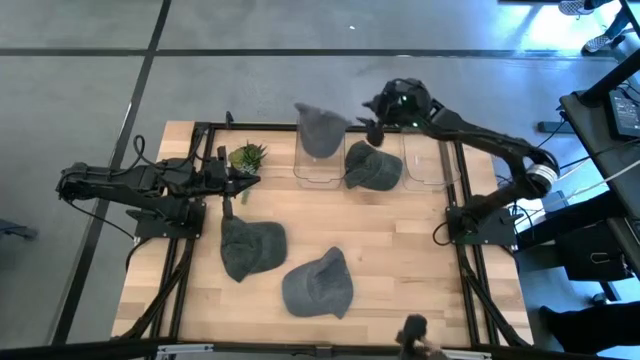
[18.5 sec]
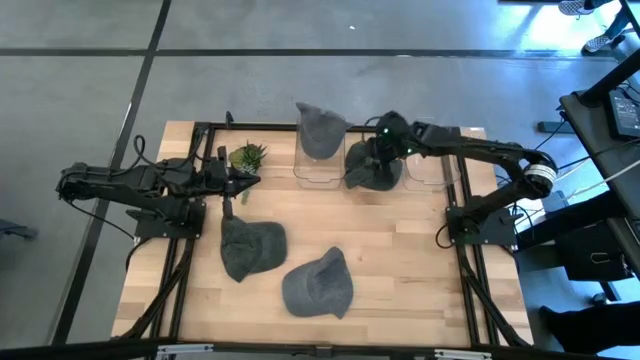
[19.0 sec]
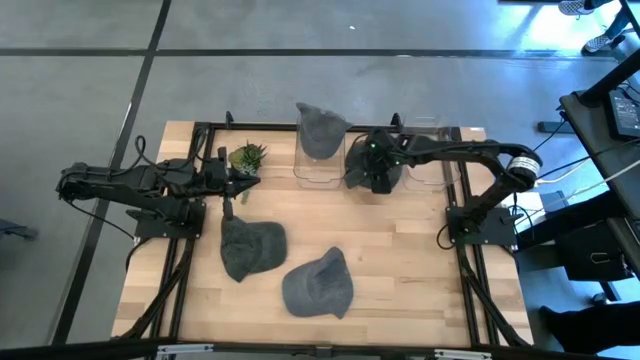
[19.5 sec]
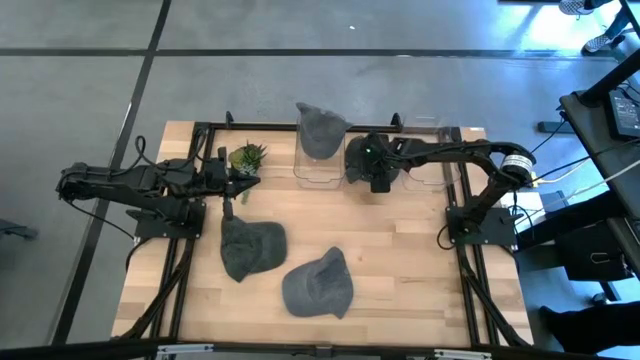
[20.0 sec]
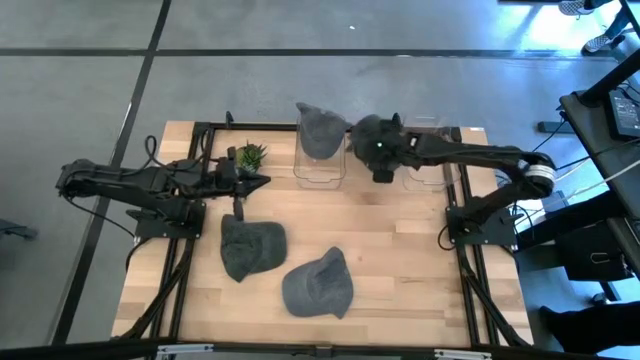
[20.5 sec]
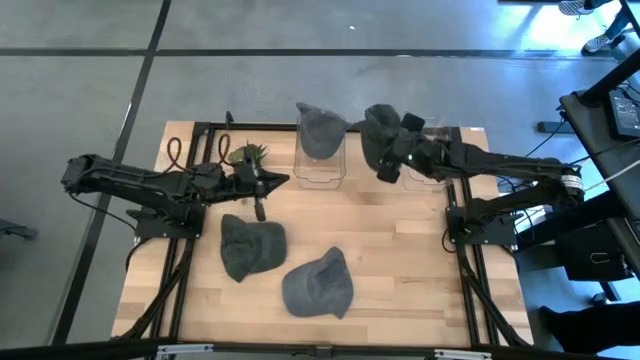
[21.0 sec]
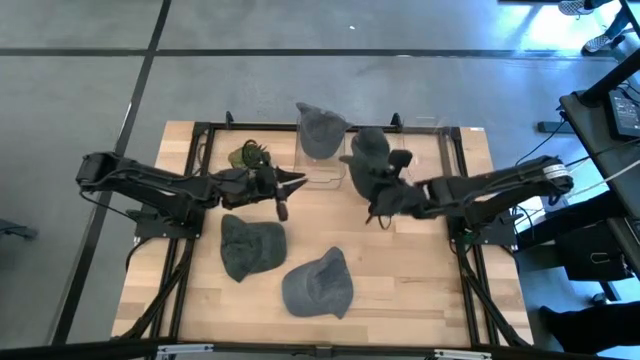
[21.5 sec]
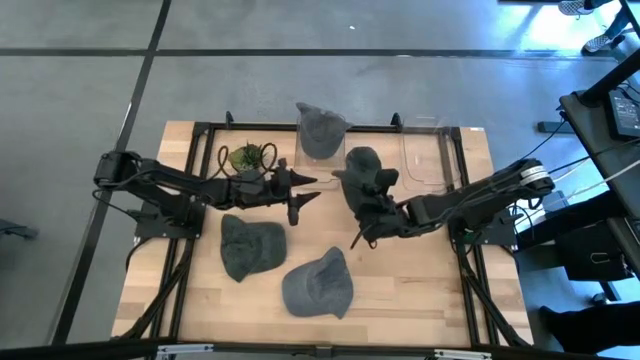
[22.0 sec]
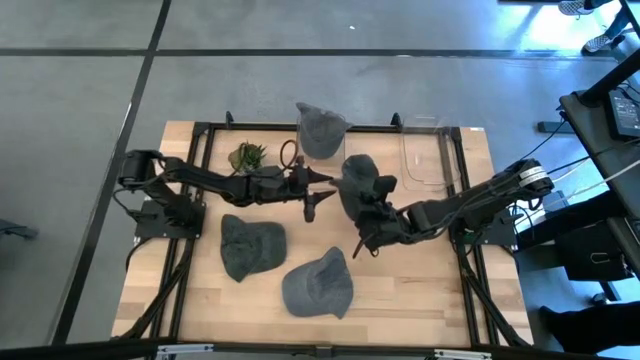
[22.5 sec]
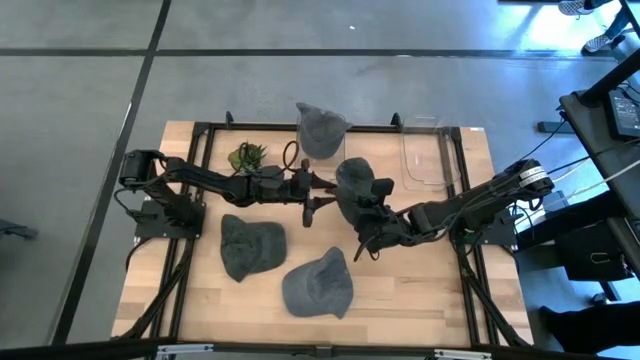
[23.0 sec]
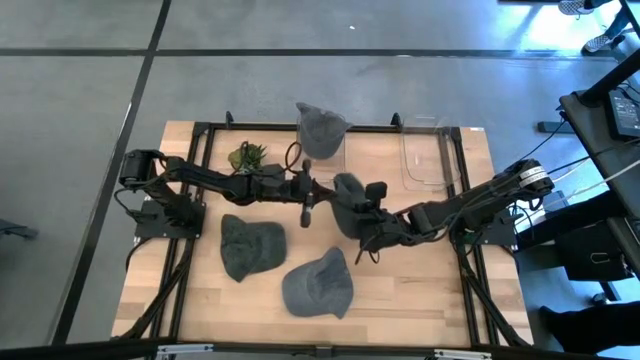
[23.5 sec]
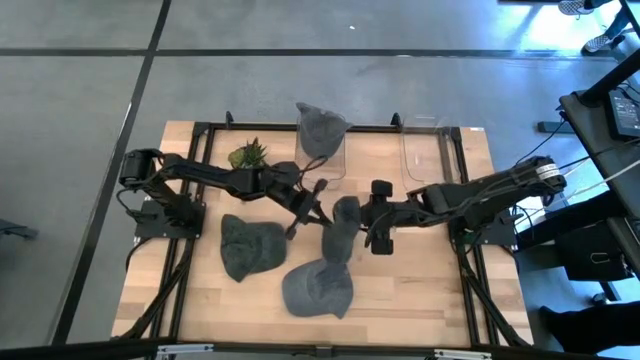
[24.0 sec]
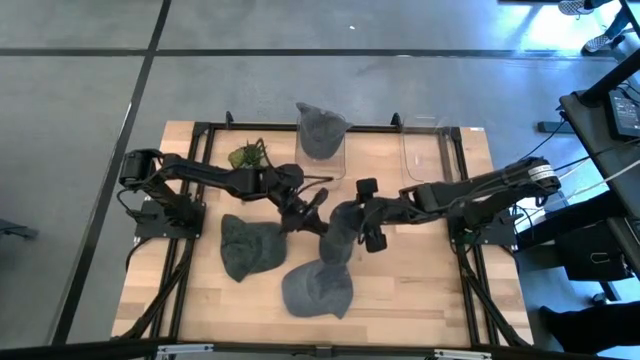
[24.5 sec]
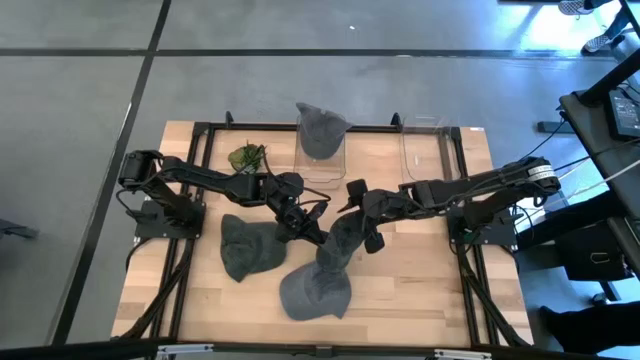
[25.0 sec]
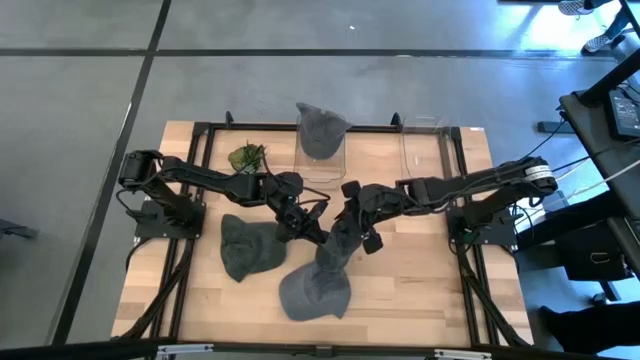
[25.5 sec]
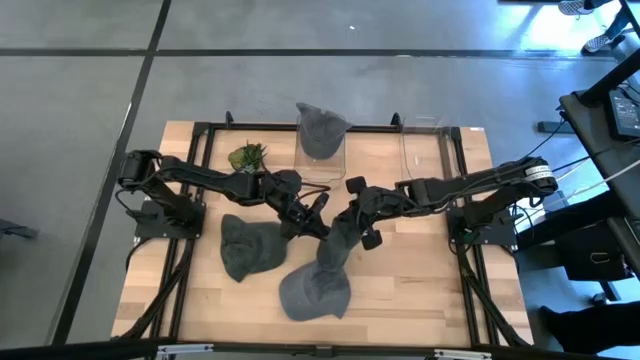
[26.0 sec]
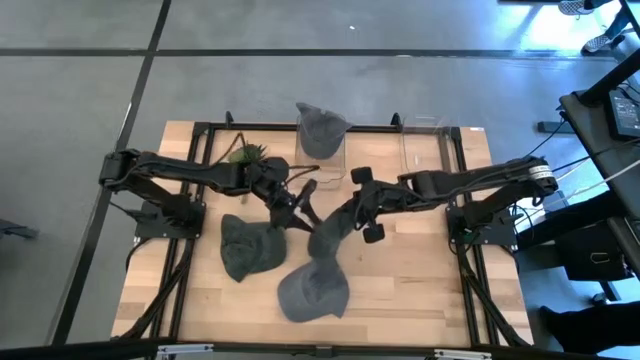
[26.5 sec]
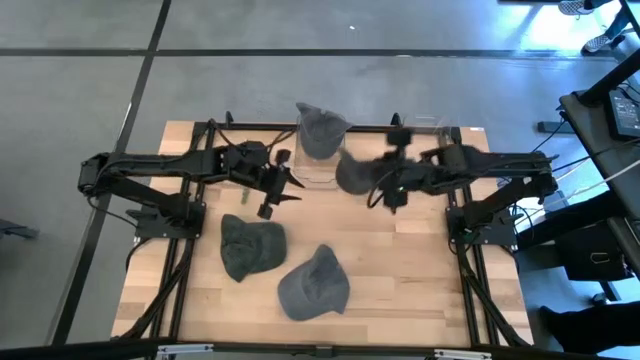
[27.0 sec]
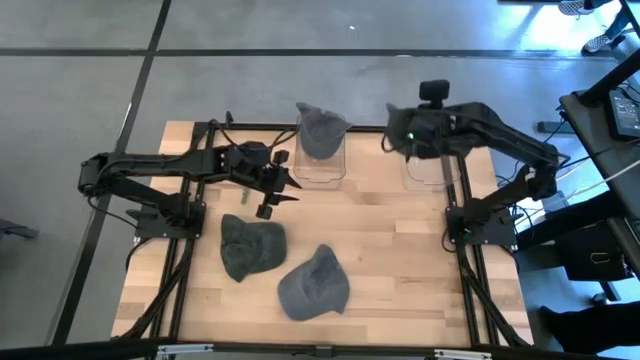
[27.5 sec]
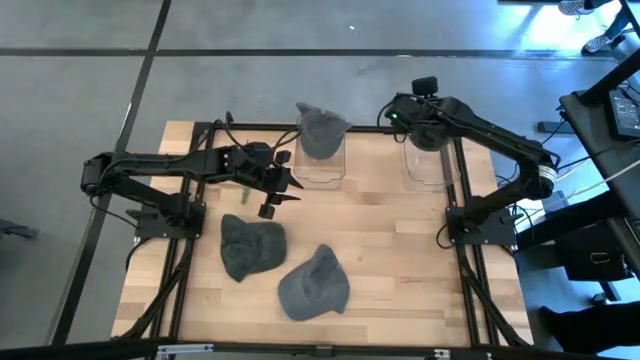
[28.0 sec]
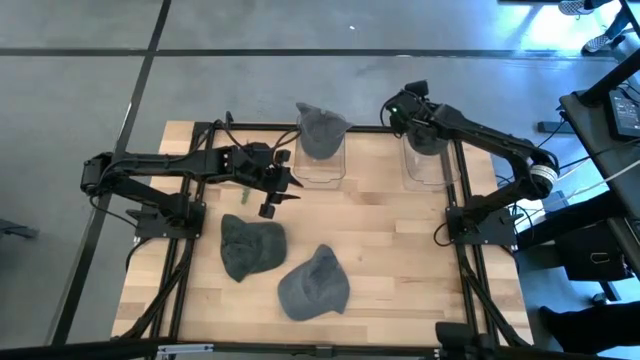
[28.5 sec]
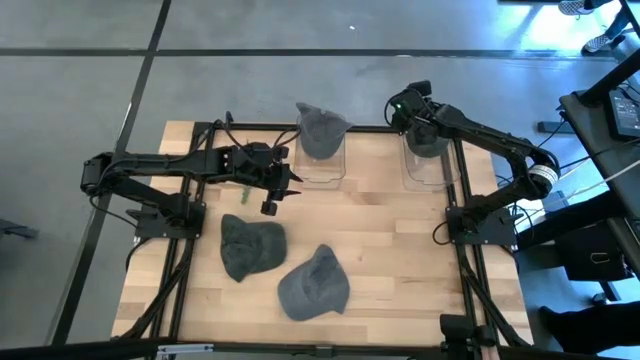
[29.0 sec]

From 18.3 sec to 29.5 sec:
Task: Pick & Place hat
Put the top green cap into the right transparent bin

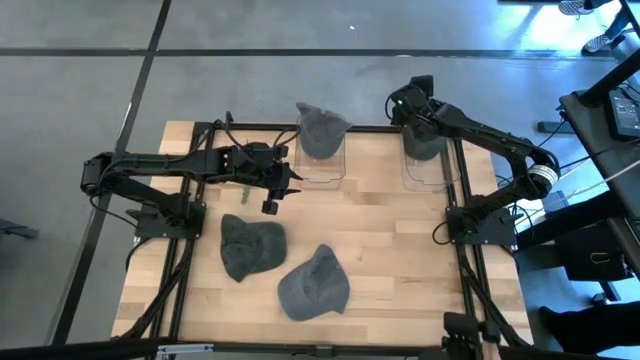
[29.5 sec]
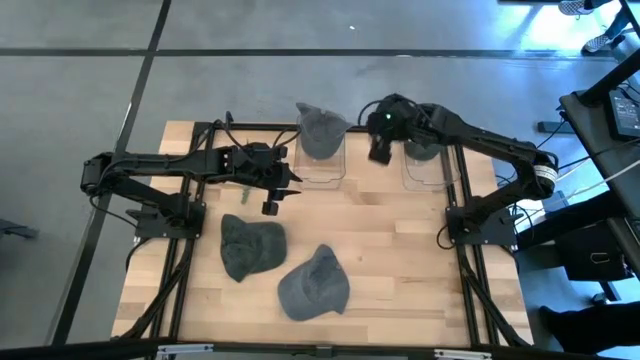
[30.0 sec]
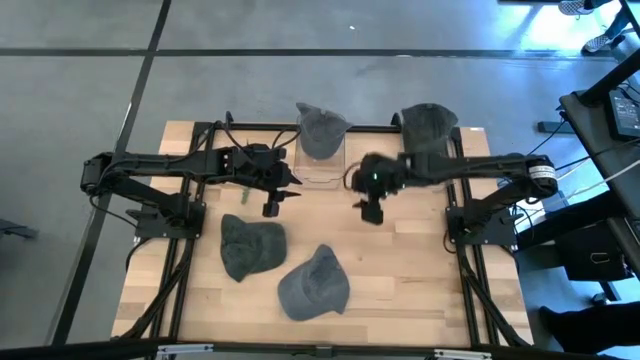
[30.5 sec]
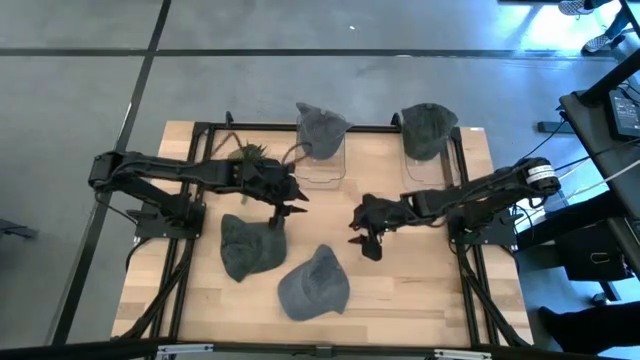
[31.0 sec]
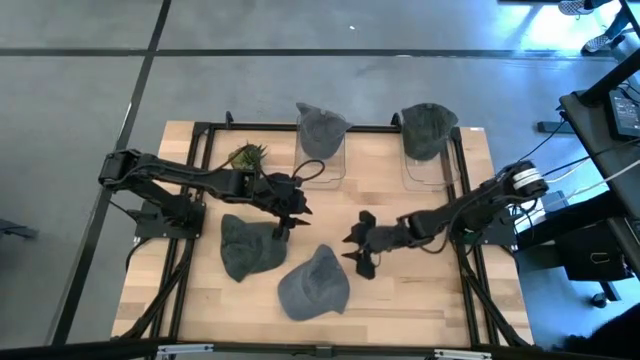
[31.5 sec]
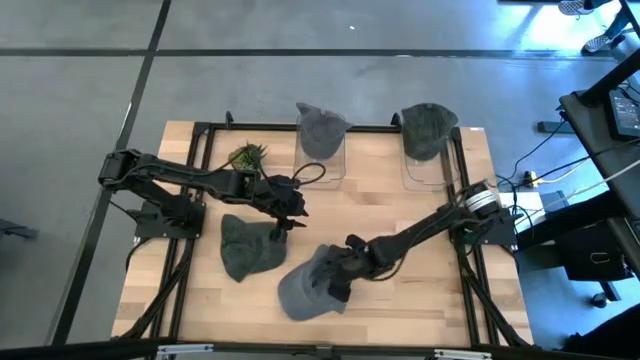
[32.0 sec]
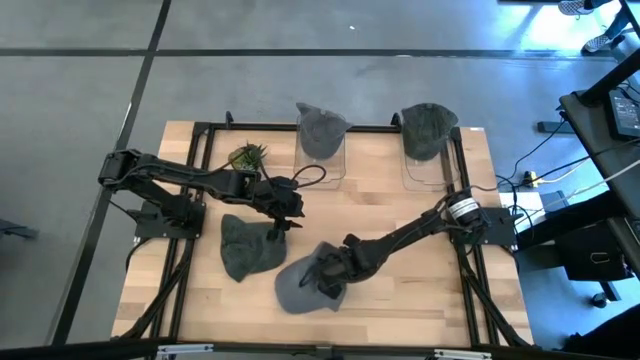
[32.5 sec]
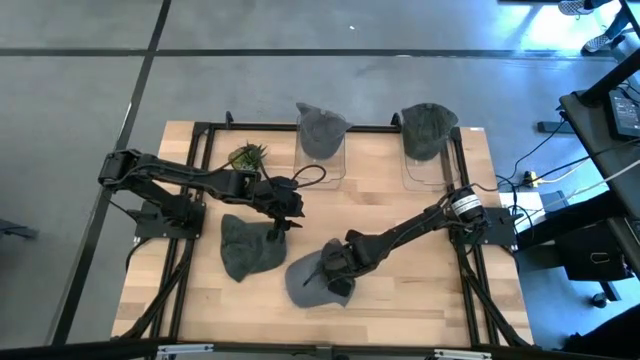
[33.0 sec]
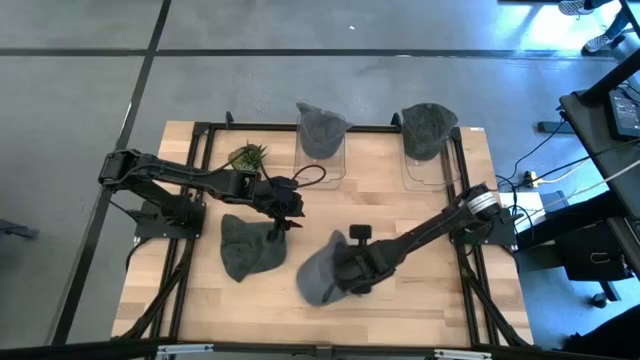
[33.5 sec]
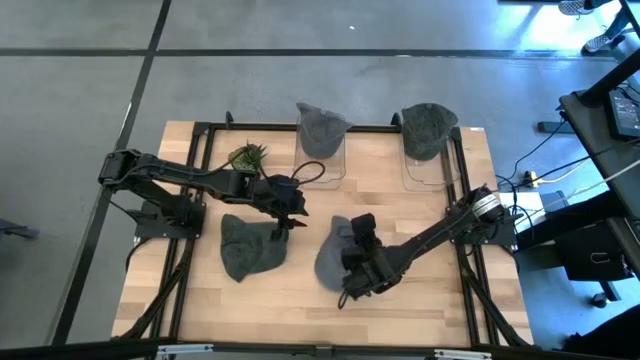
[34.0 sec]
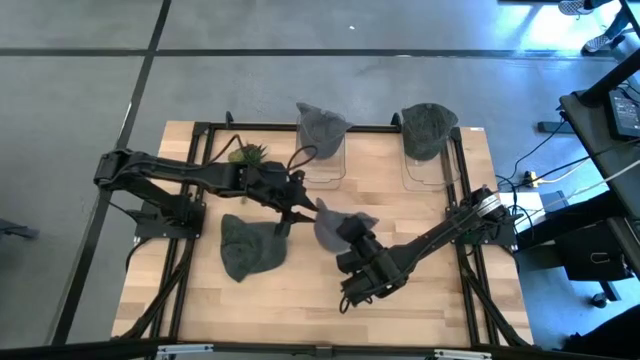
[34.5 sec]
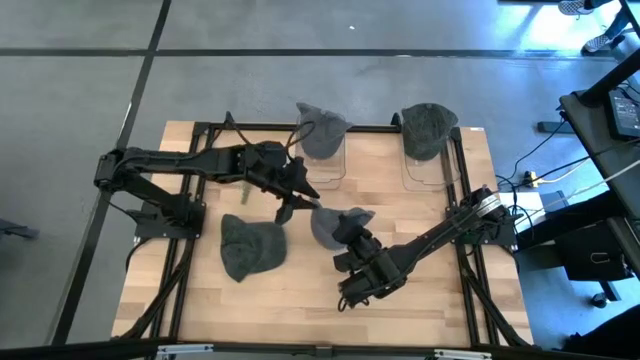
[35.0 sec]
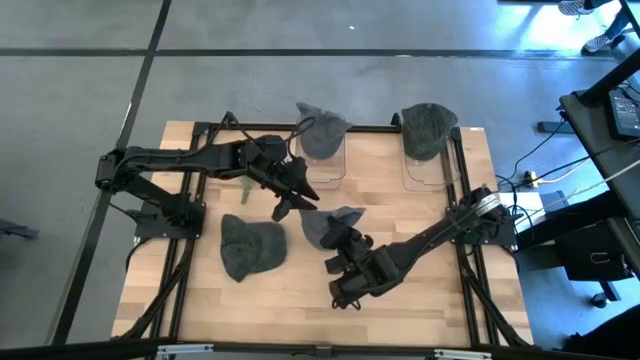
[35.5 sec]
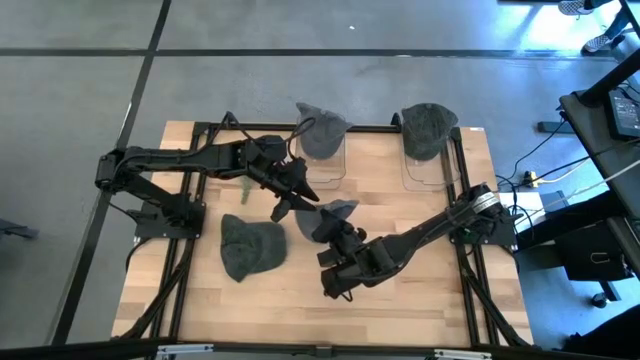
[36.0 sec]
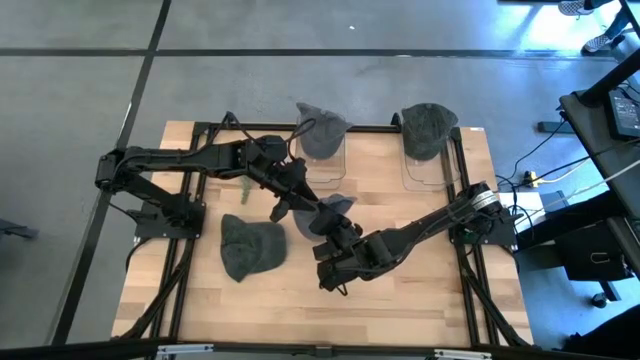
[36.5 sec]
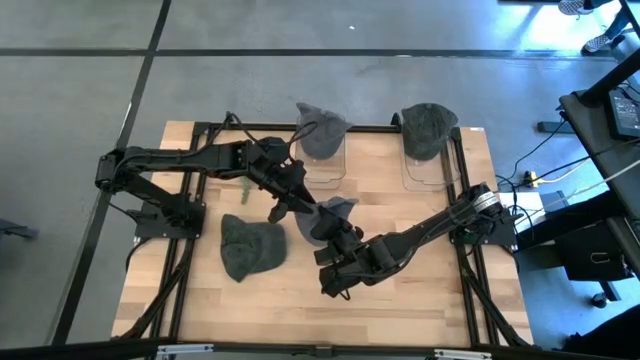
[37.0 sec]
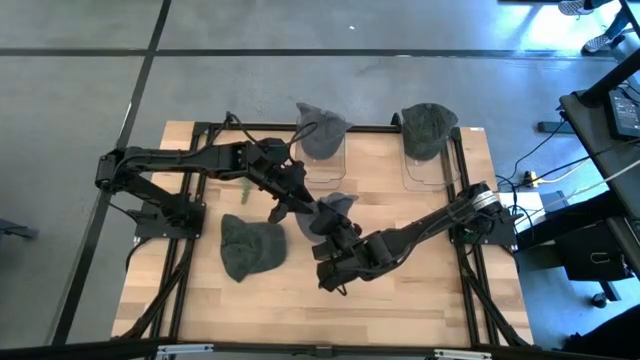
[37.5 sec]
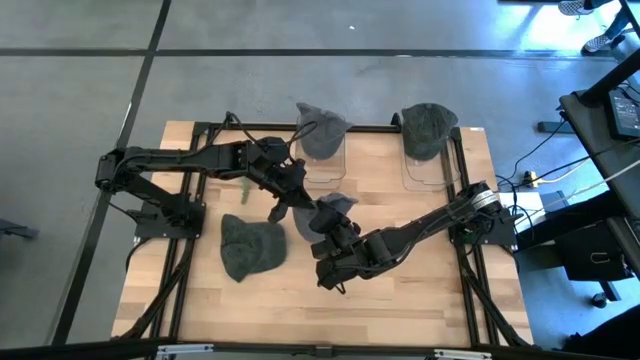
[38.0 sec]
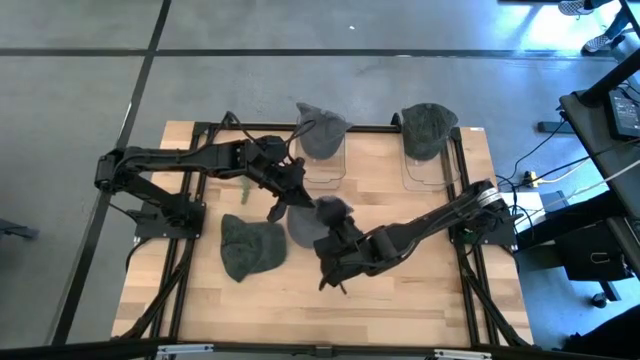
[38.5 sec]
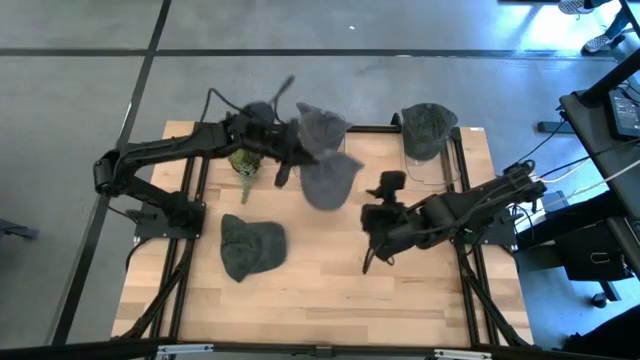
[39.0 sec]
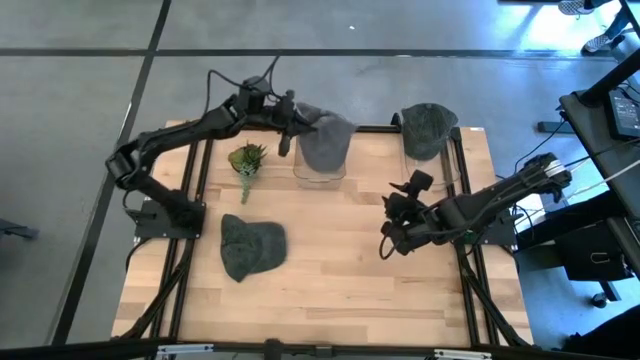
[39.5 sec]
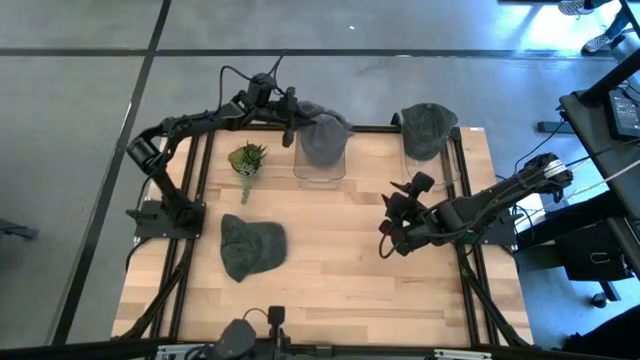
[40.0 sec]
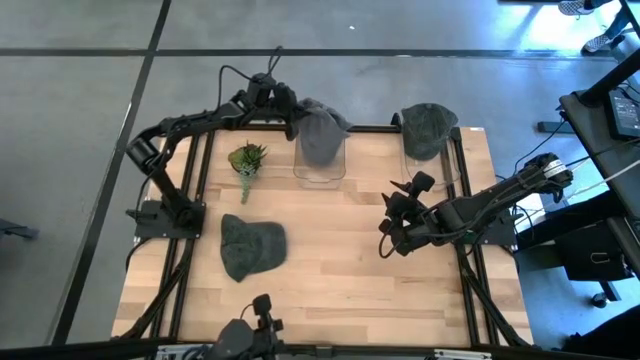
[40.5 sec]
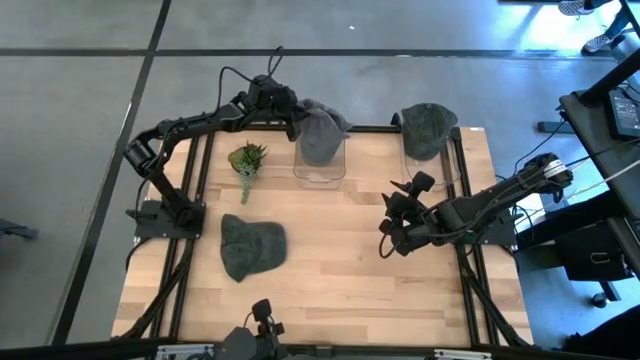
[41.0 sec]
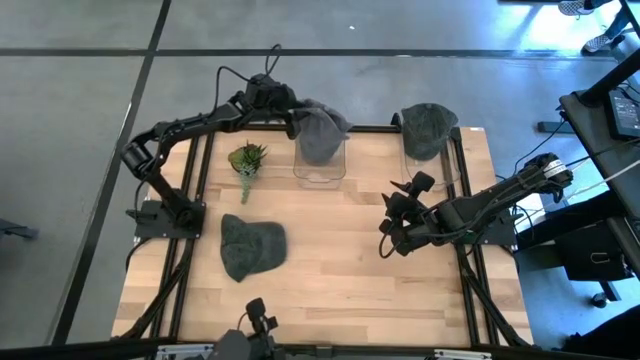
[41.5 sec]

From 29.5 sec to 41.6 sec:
Put the gray cap into the left transparent bin
